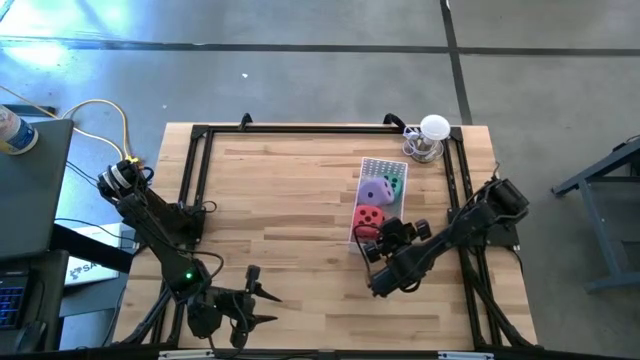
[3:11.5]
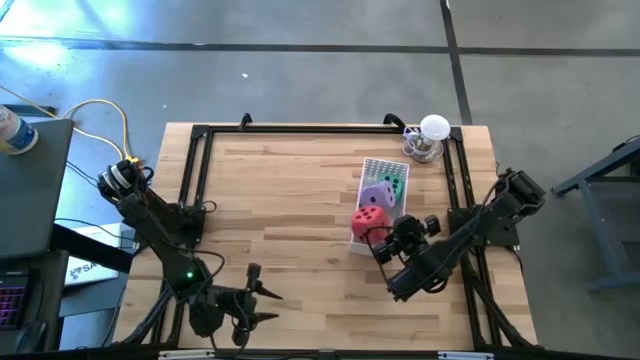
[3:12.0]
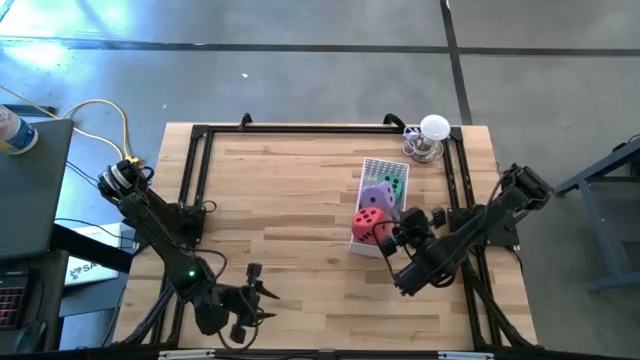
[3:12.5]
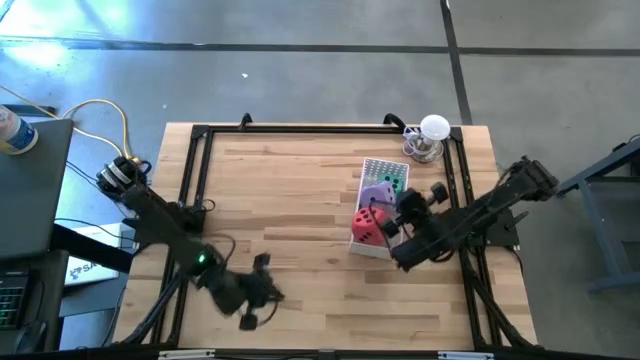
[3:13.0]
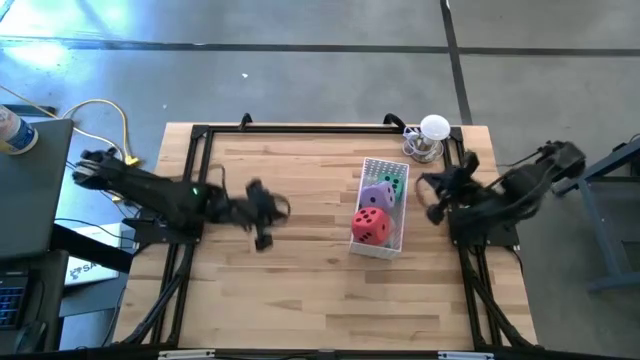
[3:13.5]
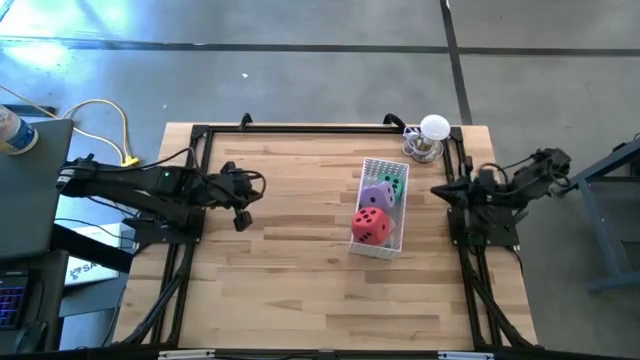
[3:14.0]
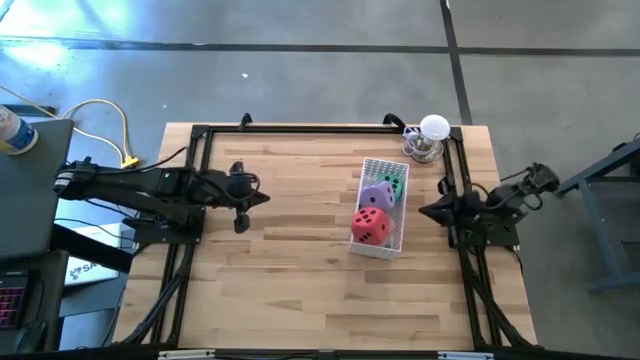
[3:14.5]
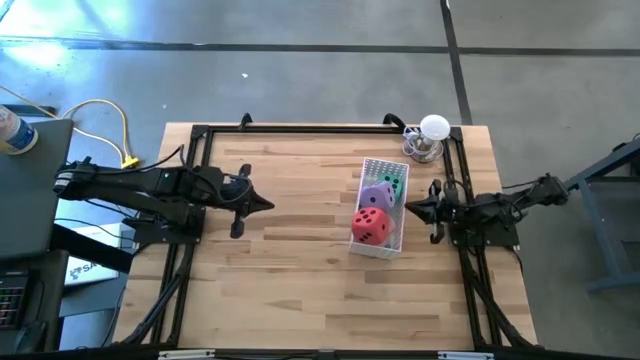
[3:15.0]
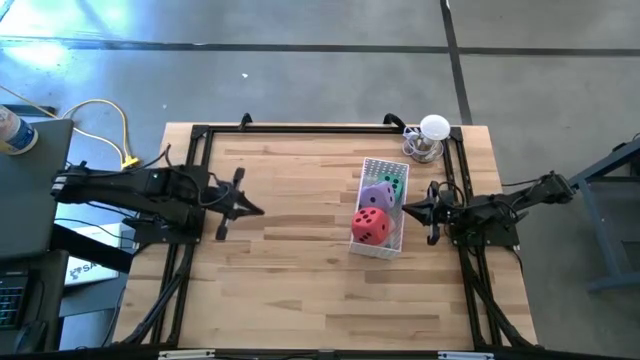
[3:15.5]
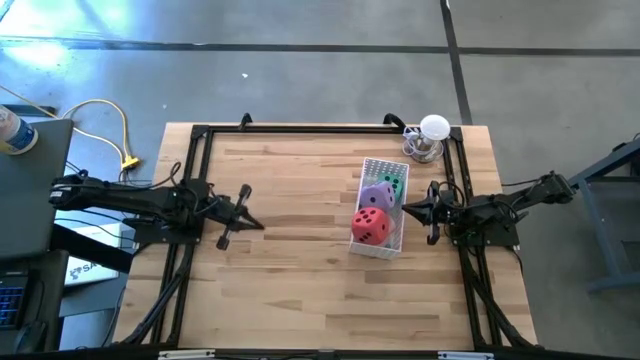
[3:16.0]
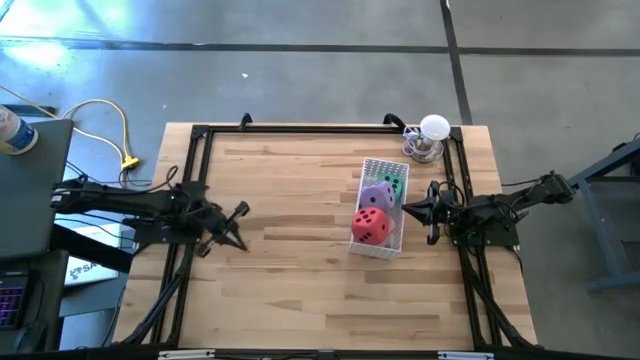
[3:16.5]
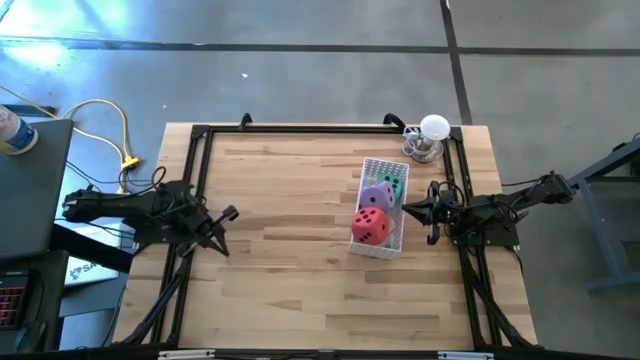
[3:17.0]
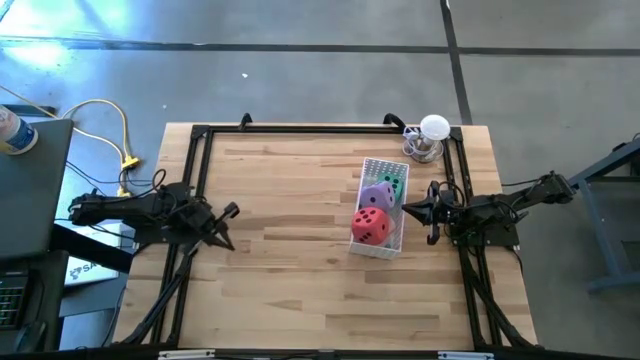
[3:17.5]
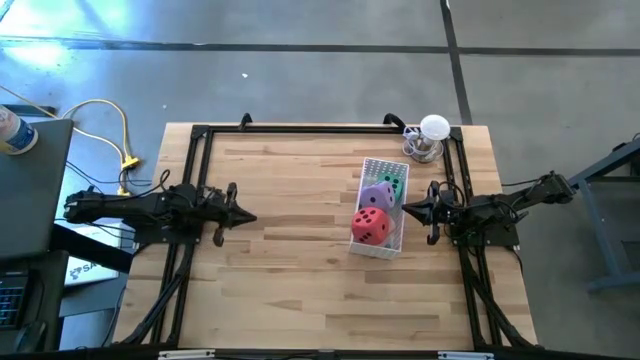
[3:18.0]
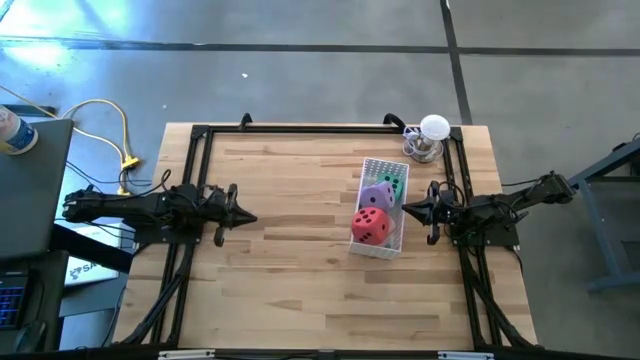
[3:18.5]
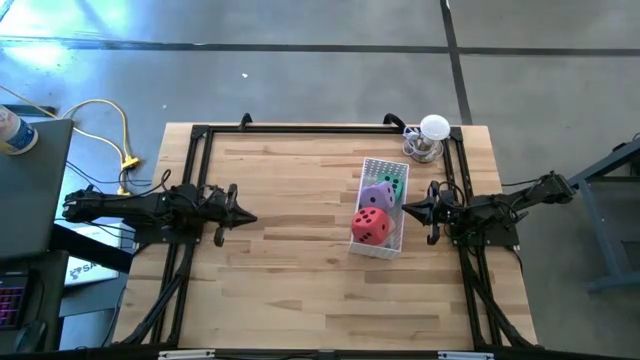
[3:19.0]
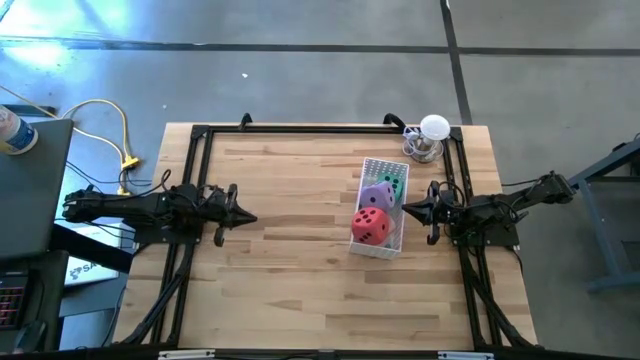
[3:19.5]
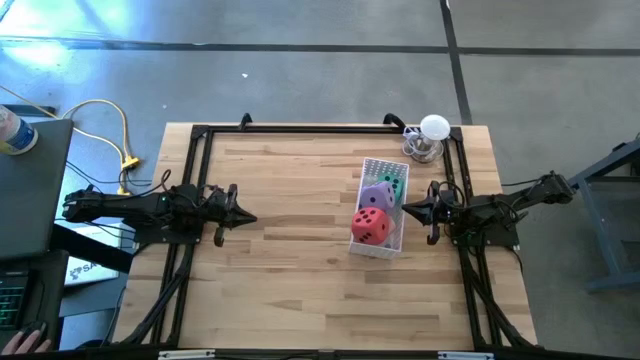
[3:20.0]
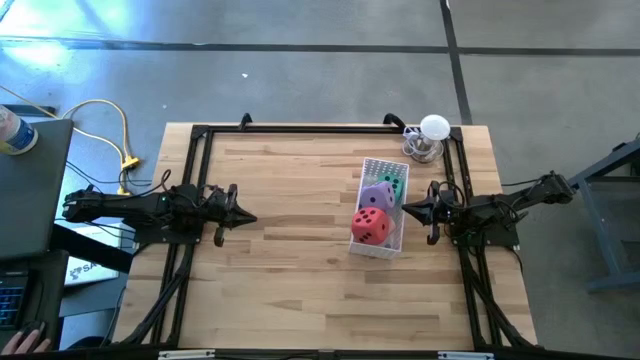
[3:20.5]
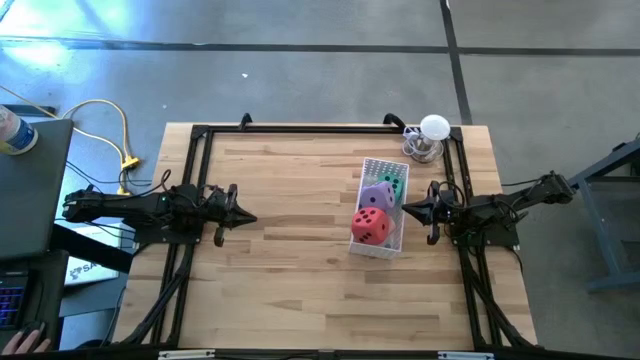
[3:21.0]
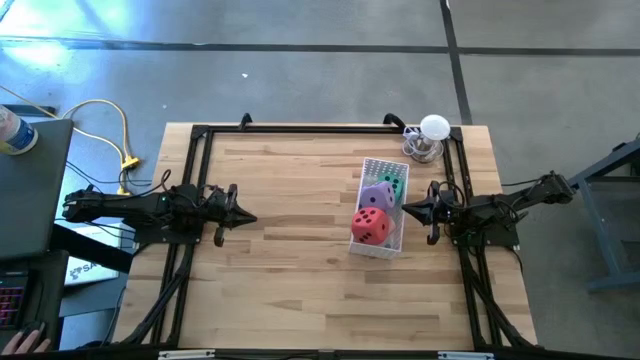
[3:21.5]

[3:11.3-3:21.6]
Task: Pick & Place Dice
Return to Home Position

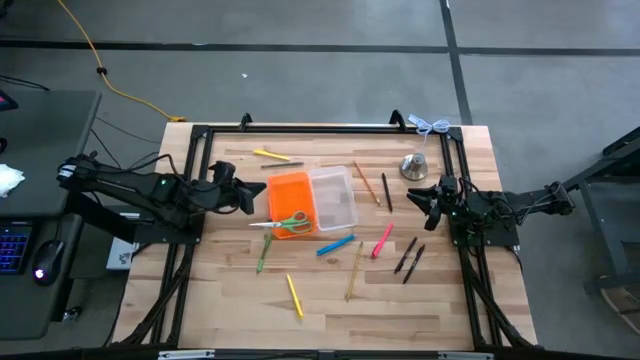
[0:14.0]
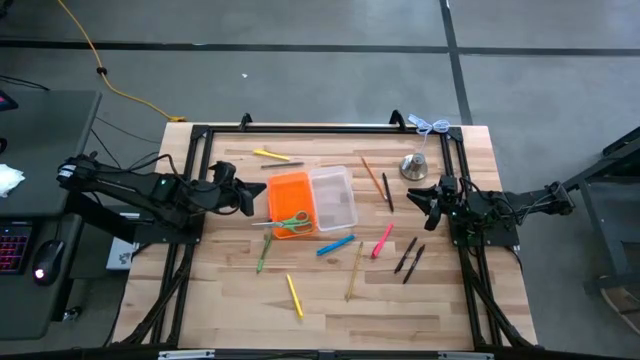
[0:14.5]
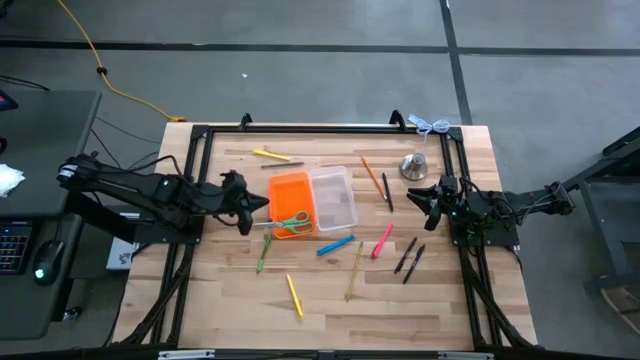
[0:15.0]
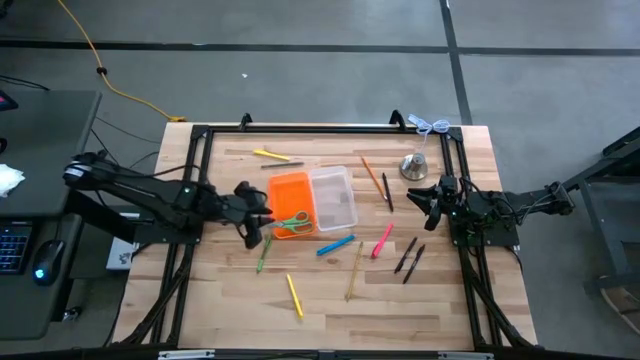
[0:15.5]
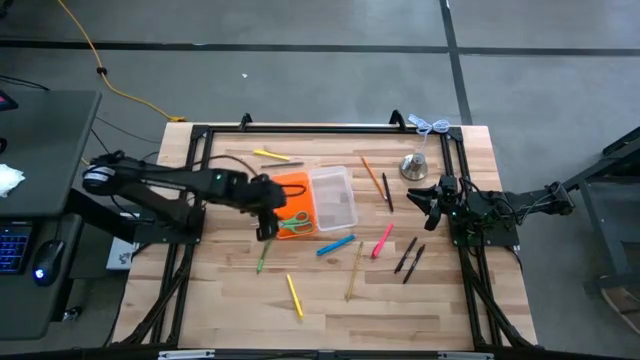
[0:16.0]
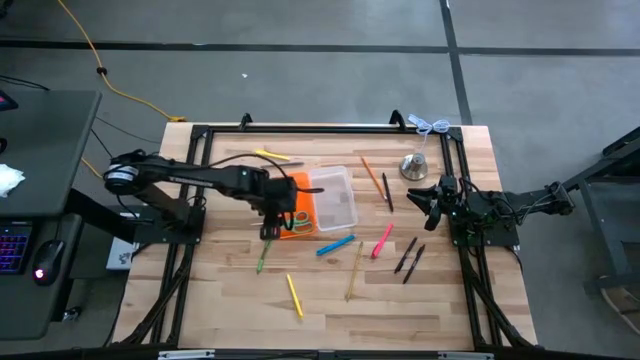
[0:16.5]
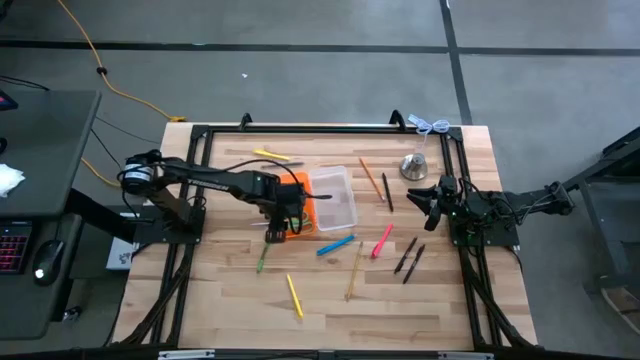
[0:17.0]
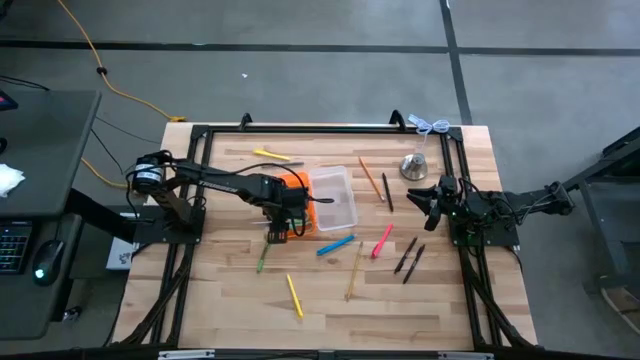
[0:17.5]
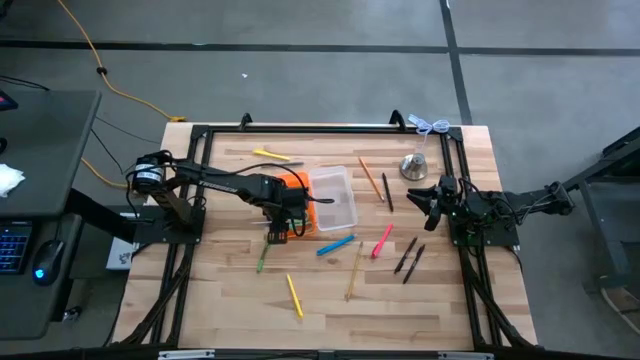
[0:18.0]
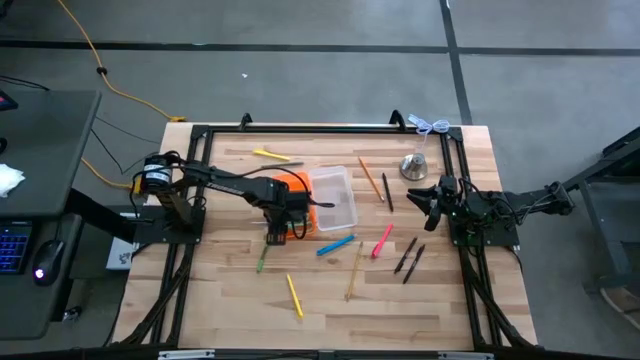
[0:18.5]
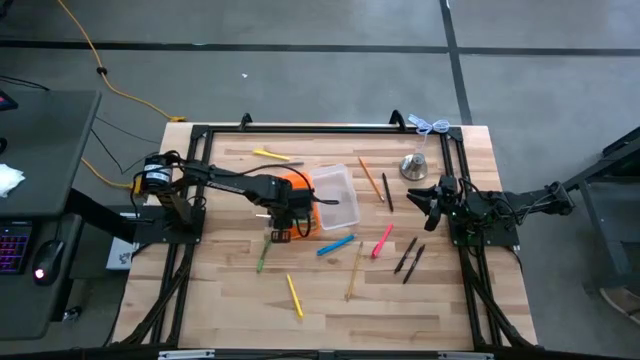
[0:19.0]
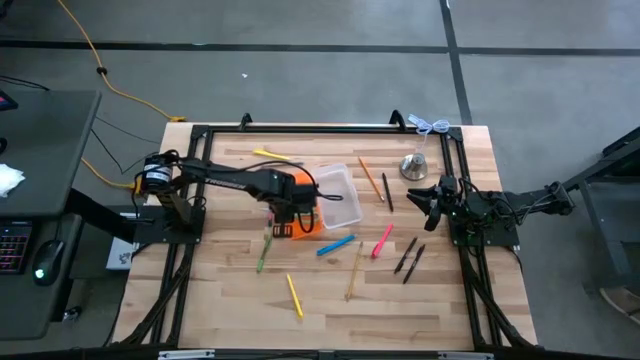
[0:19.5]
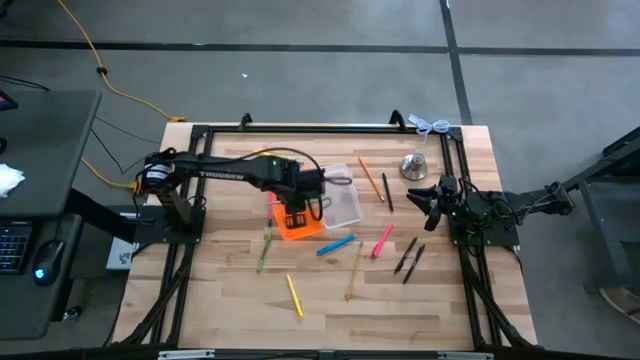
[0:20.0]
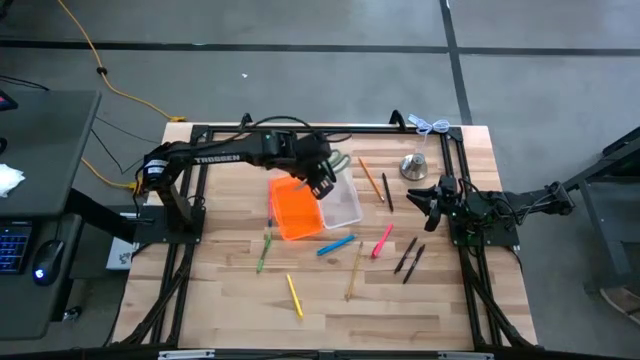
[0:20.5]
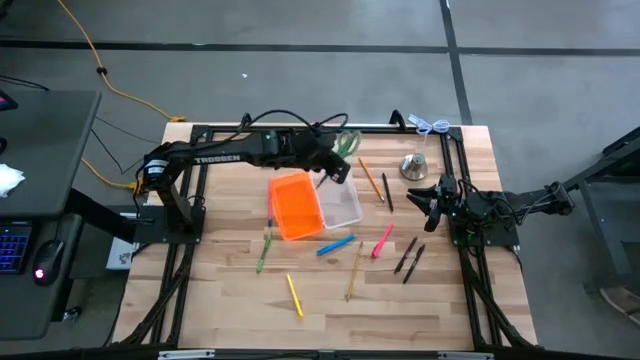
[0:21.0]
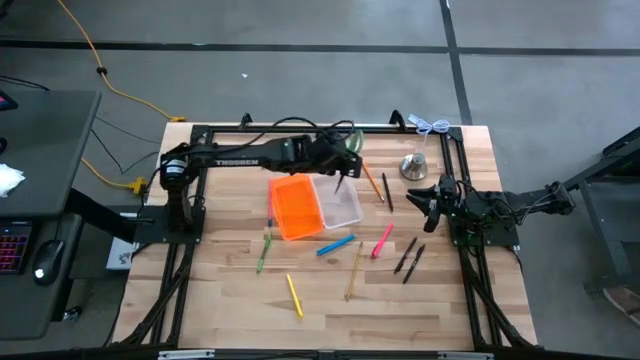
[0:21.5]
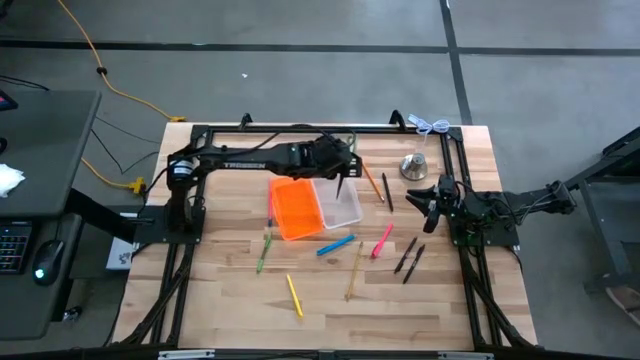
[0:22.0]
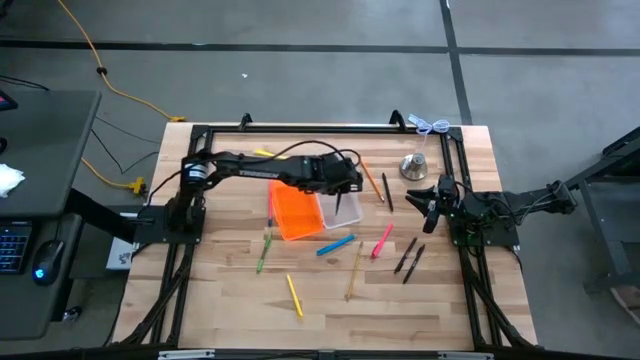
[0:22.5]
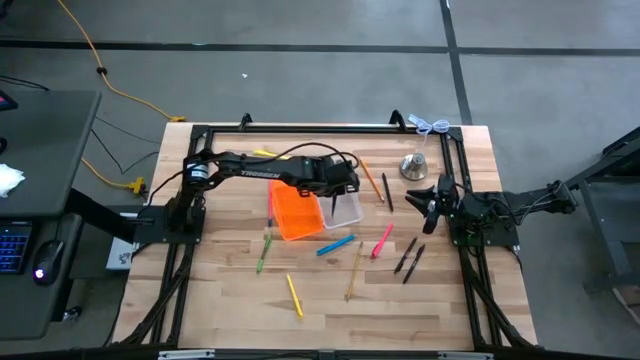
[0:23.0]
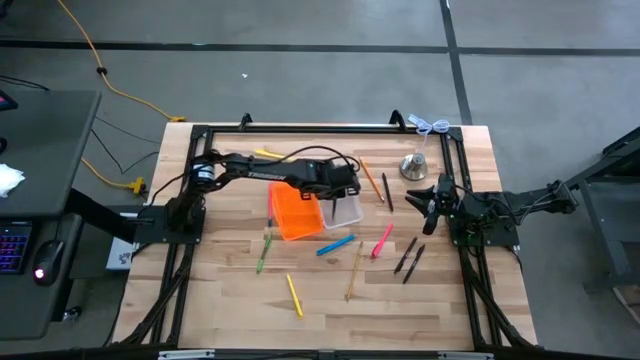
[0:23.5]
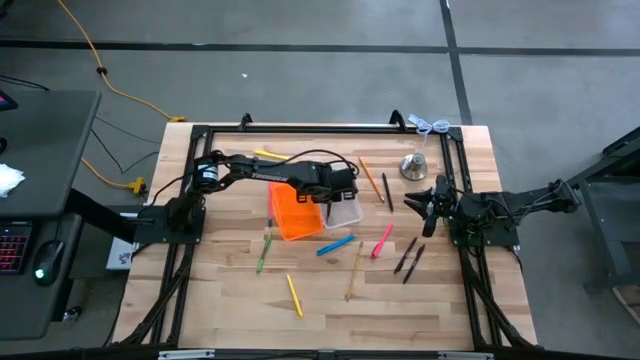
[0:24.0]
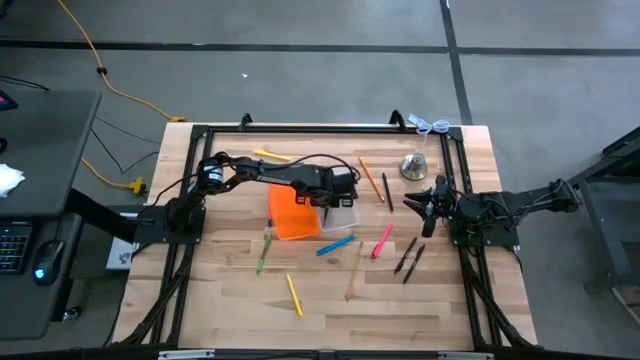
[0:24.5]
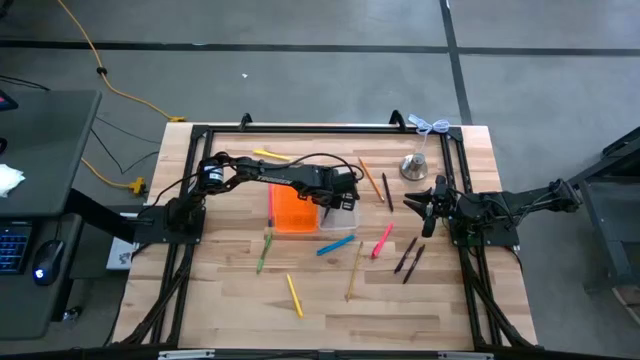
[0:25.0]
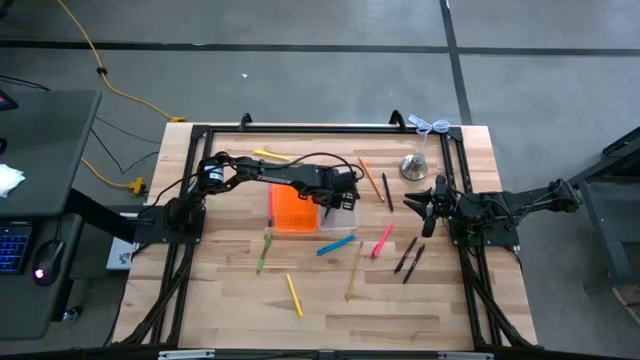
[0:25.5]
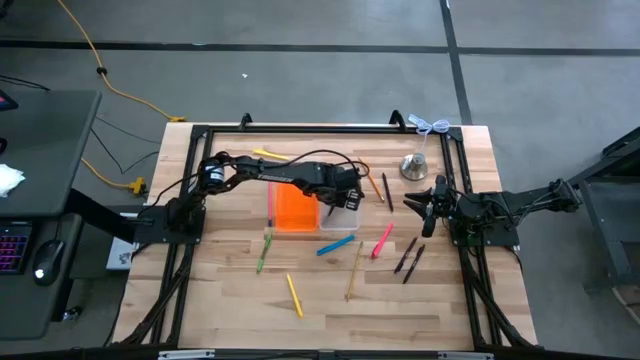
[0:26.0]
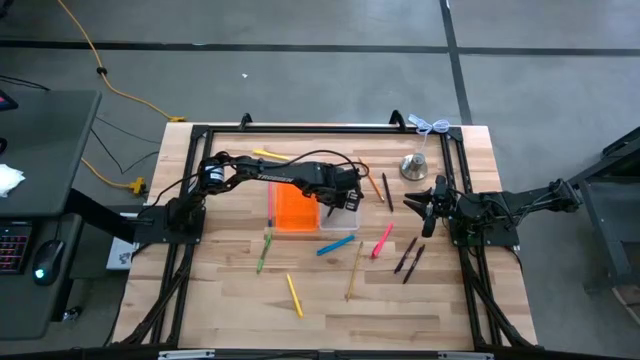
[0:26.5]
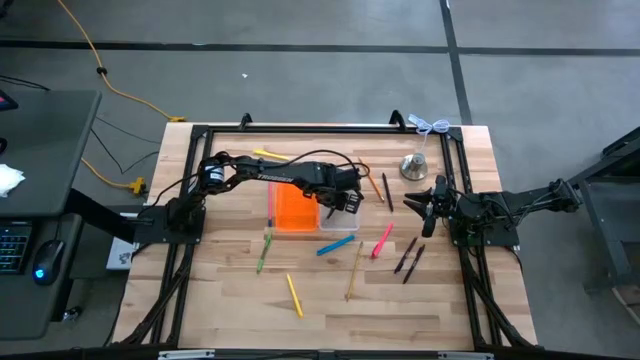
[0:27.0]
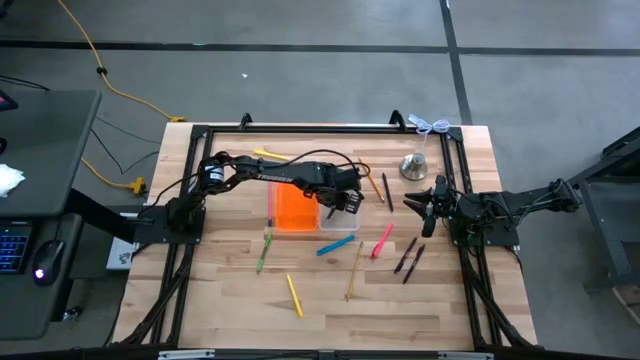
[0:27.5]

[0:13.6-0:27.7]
Task: Pick & place school supplies into a supply box
Put the green scissors into the supply box
